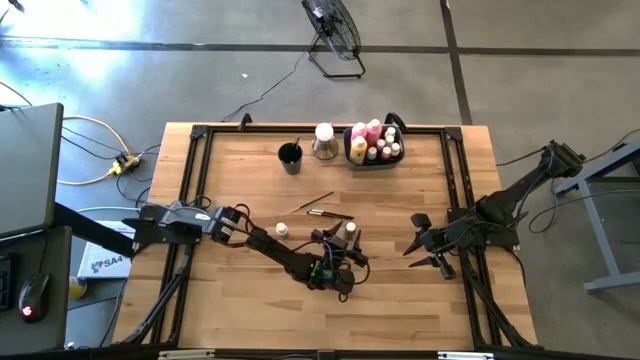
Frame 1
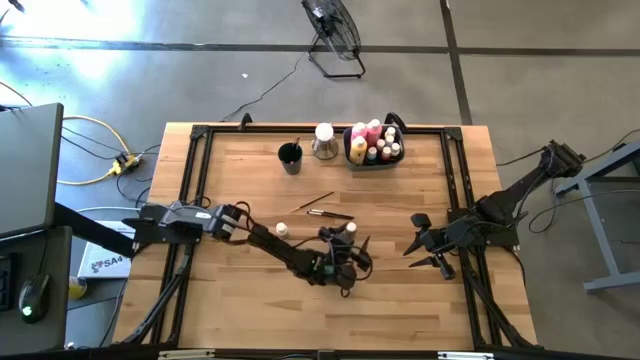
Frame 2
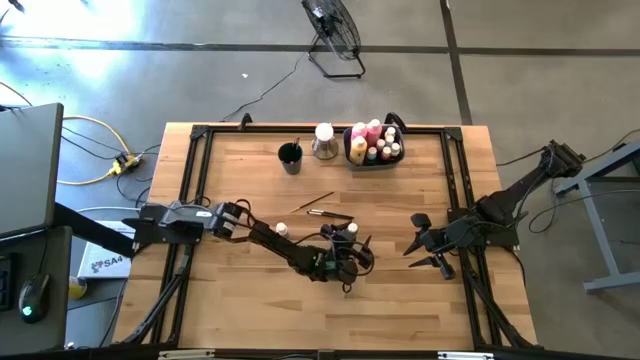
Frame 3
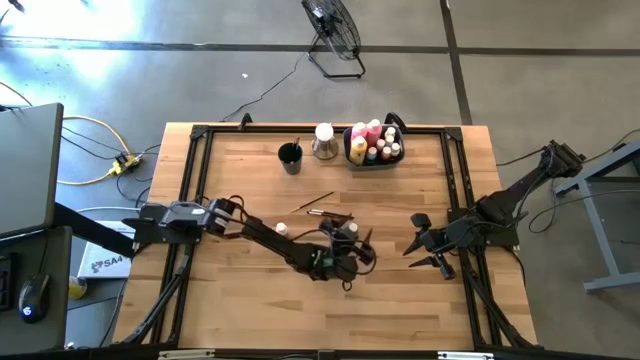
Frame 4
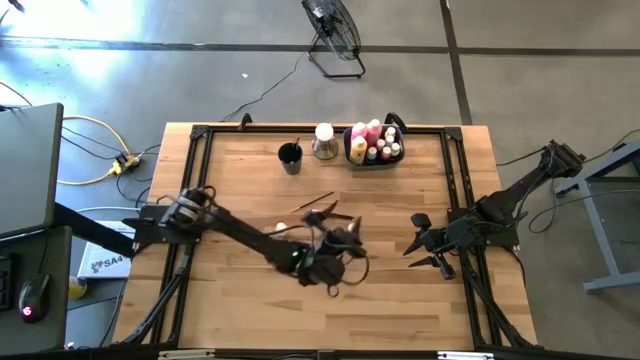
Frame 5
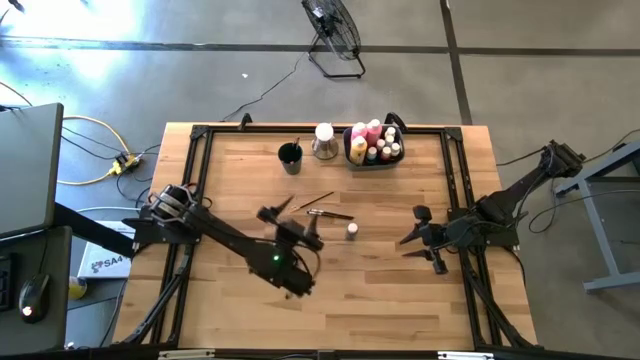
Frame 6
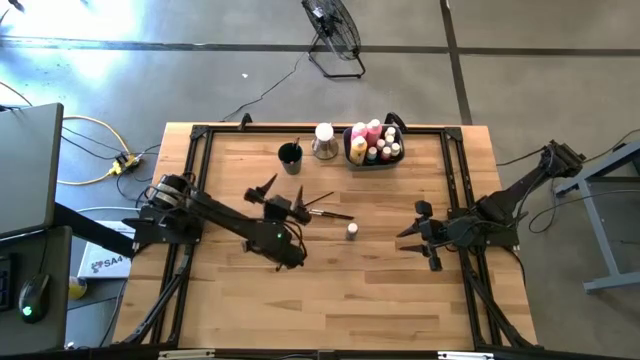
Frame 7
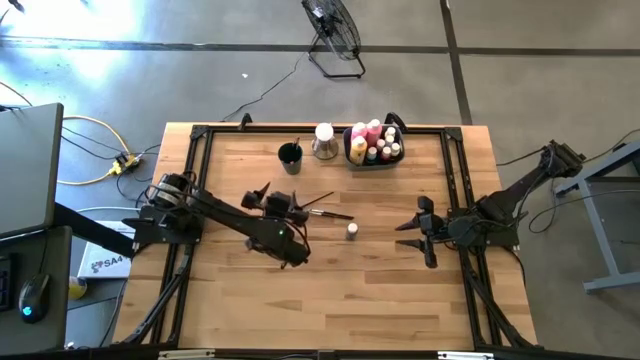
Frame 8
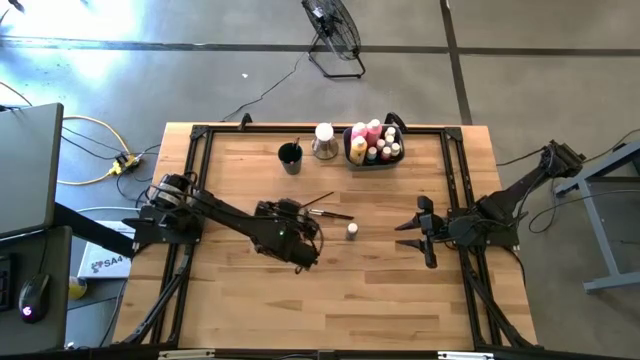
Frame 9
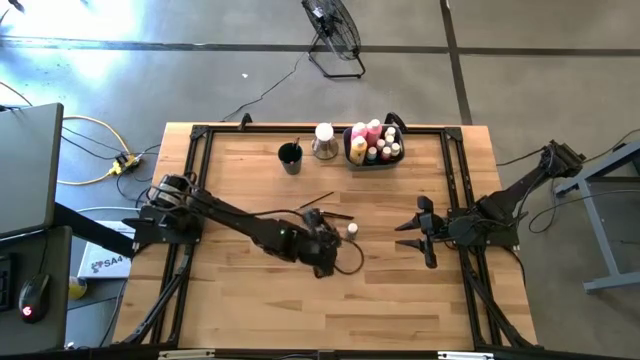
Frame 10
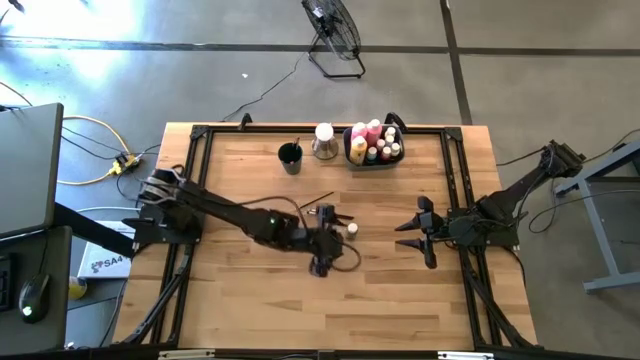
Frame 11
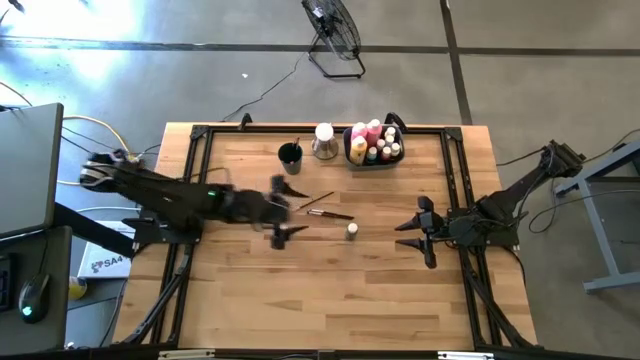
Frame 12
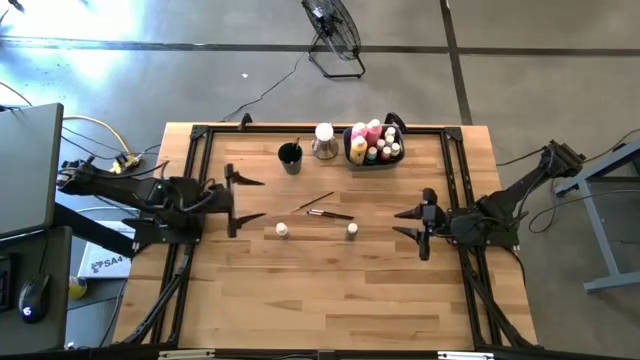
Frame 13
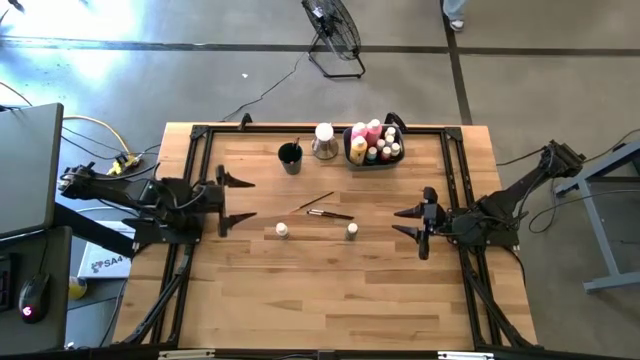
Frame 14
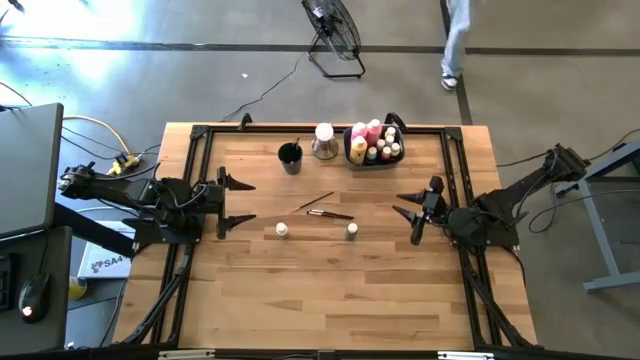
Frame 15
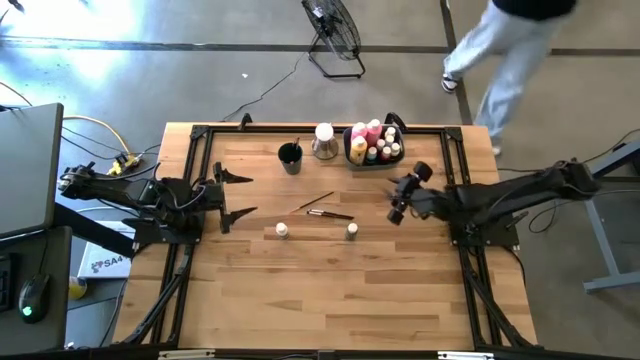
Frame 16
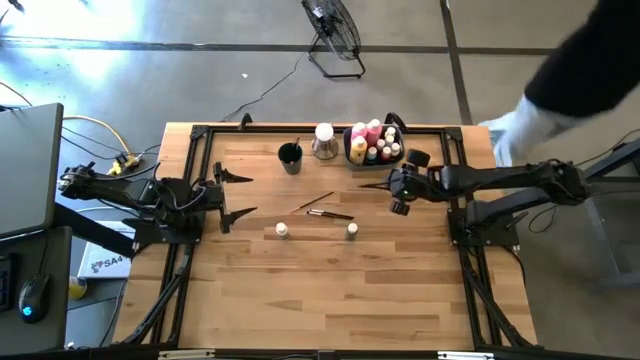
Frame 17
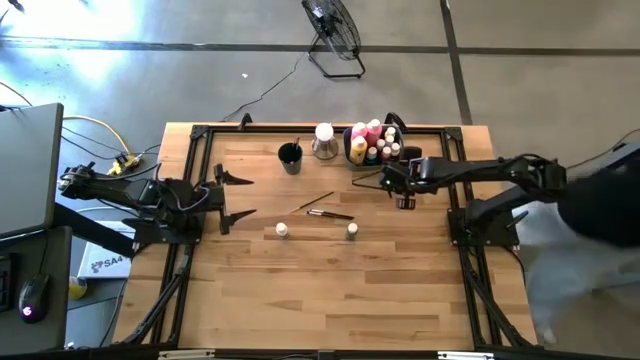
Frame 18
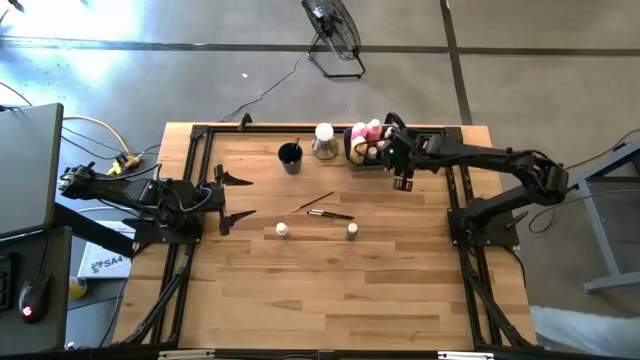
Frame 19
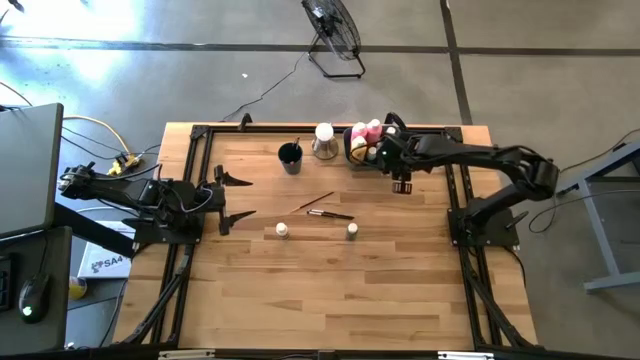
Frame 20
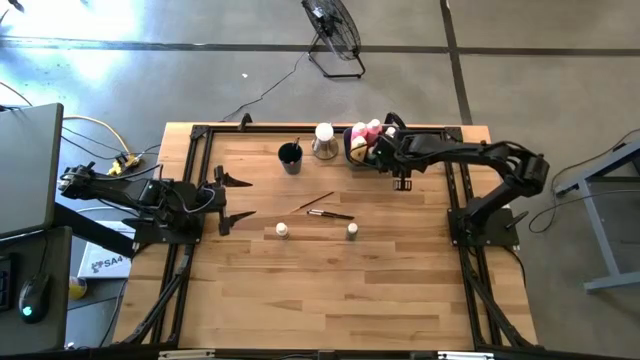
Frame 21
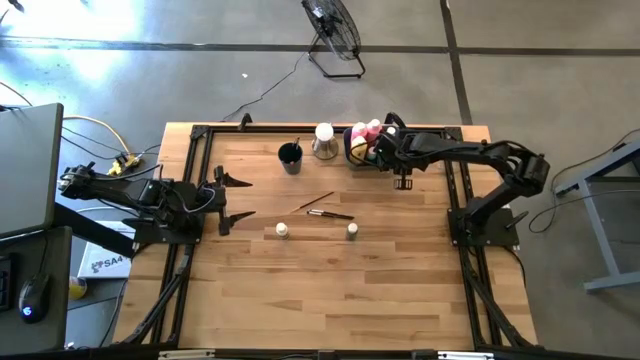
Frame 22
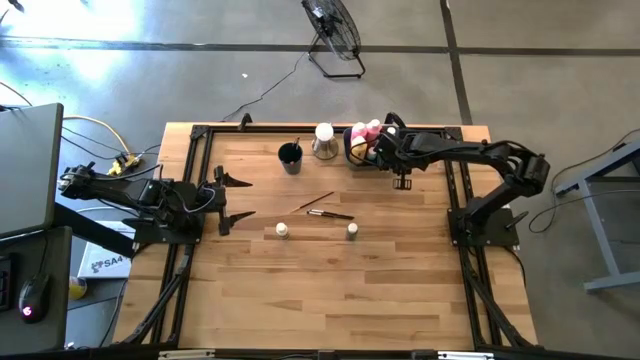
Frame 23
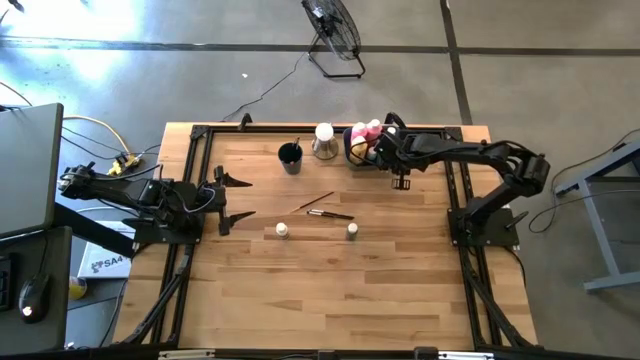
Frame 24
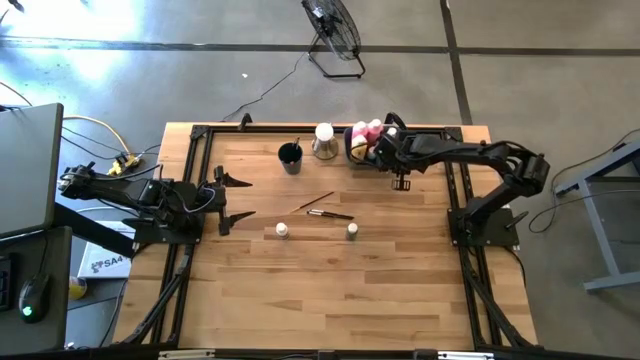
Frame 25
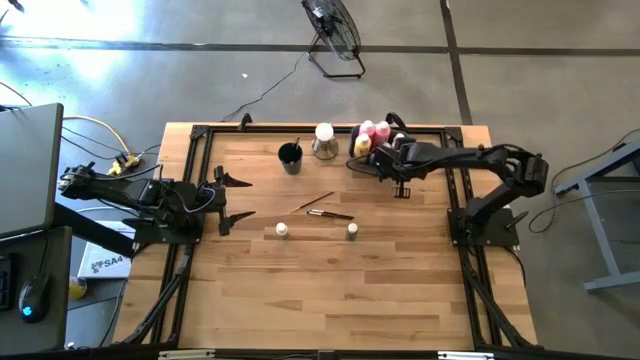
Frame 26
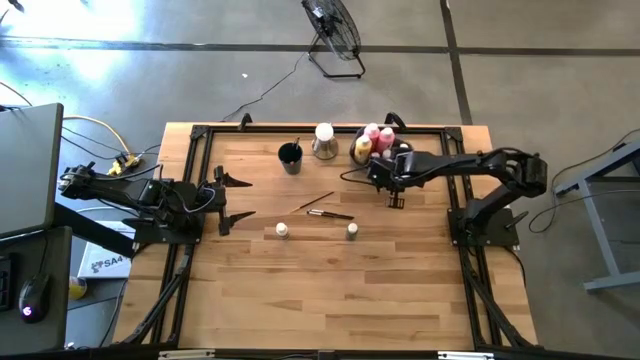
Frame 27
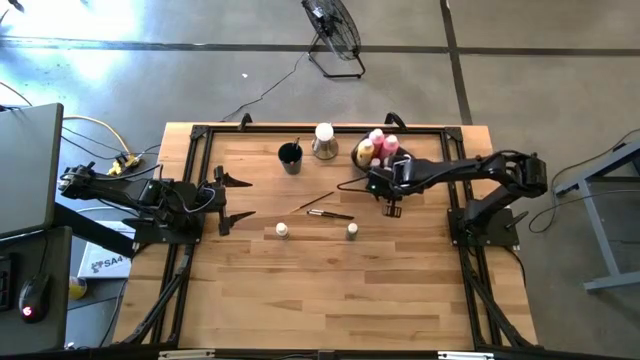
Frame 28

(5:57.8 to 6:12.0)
Task: Pick & Place Paint Supplies
Adjust the blue bin
